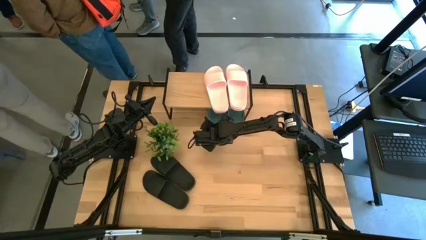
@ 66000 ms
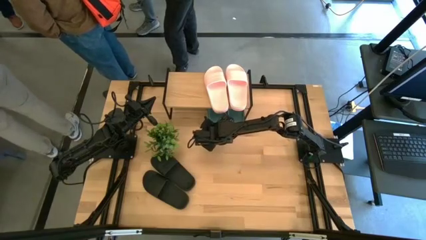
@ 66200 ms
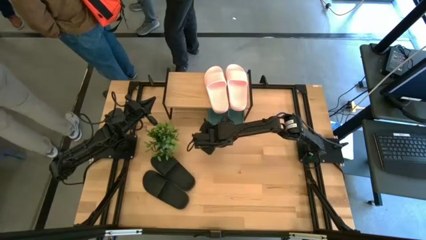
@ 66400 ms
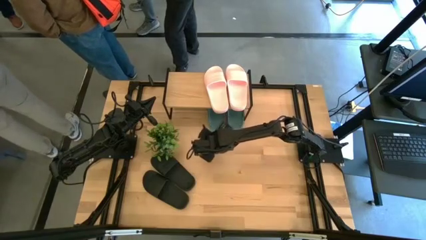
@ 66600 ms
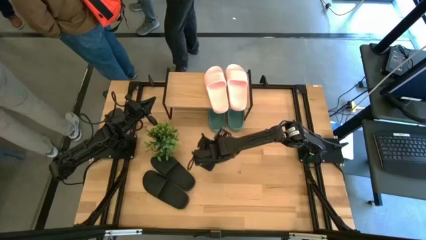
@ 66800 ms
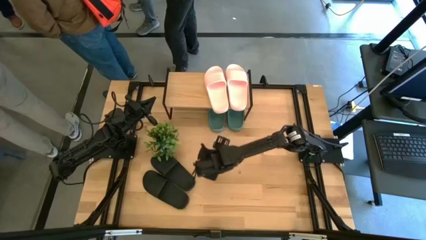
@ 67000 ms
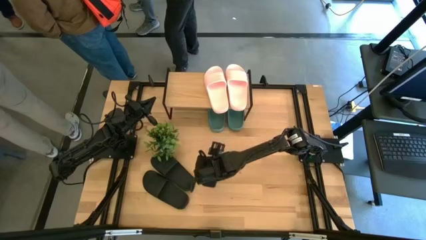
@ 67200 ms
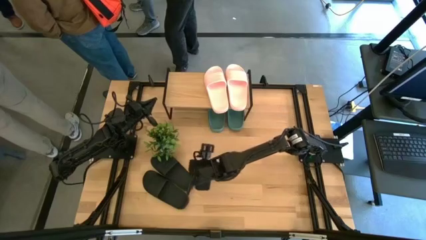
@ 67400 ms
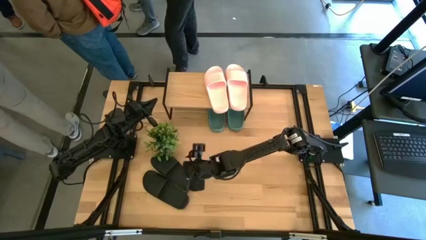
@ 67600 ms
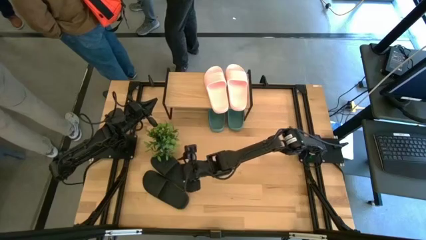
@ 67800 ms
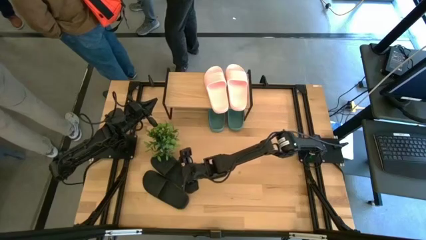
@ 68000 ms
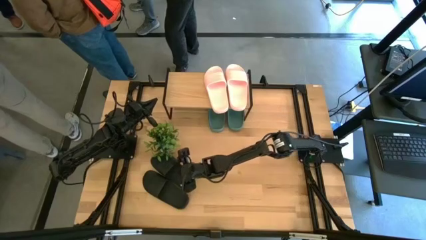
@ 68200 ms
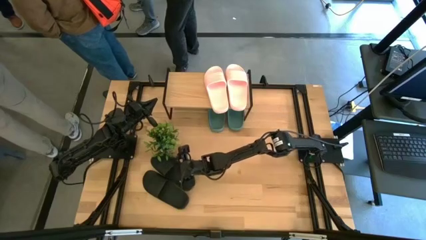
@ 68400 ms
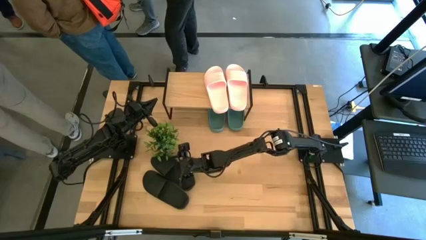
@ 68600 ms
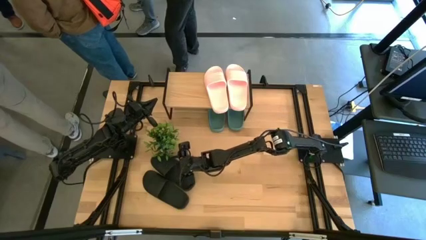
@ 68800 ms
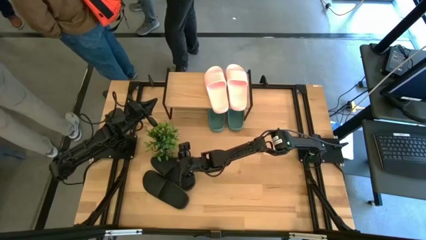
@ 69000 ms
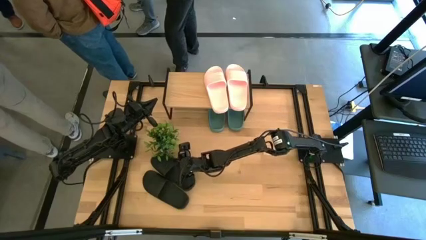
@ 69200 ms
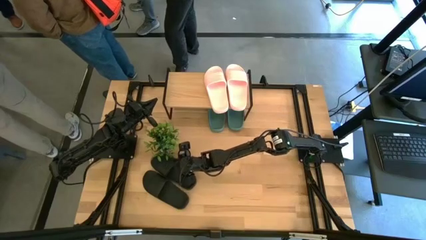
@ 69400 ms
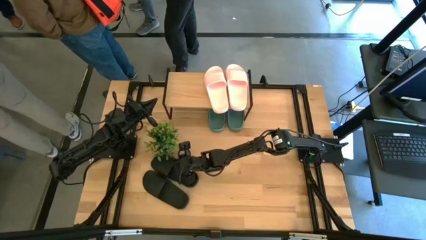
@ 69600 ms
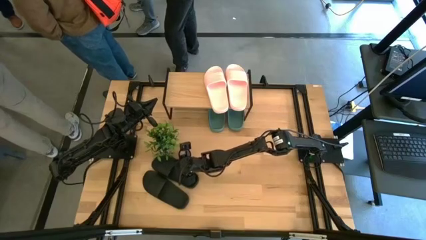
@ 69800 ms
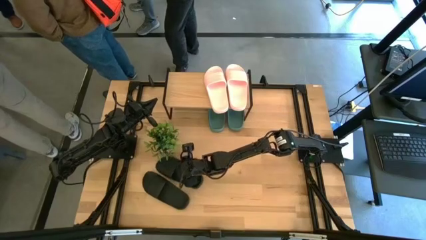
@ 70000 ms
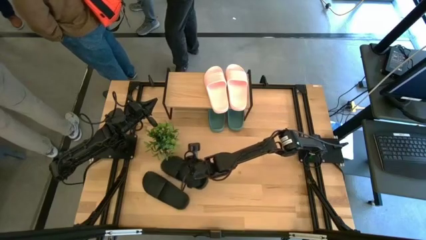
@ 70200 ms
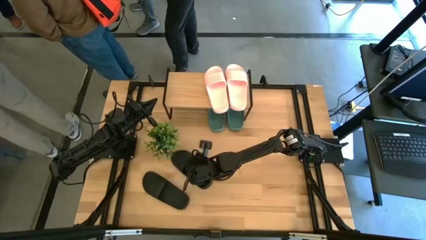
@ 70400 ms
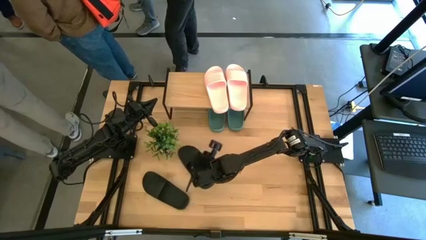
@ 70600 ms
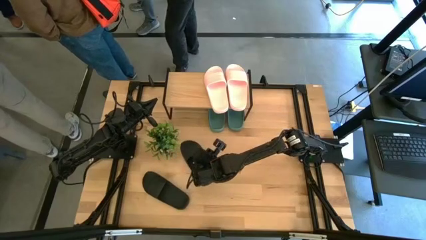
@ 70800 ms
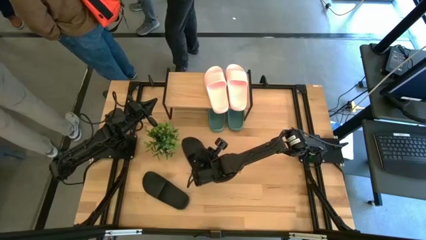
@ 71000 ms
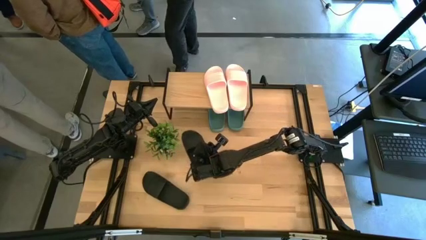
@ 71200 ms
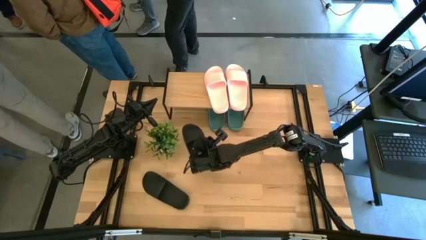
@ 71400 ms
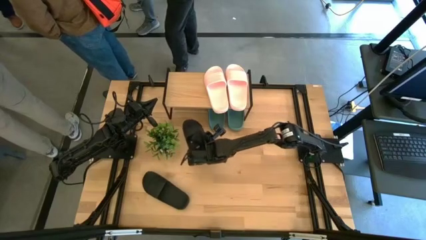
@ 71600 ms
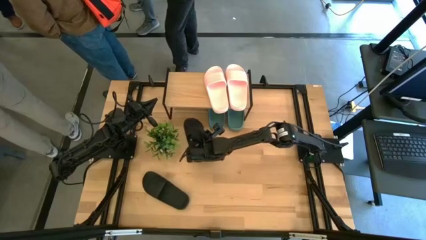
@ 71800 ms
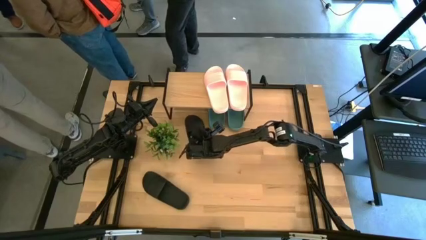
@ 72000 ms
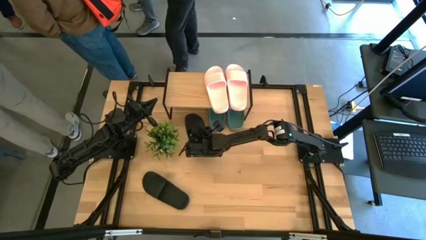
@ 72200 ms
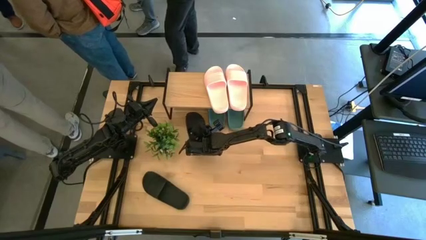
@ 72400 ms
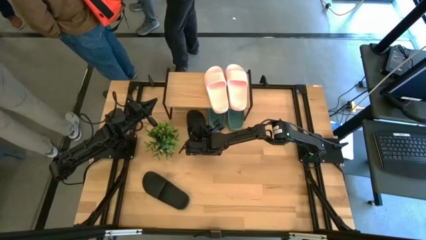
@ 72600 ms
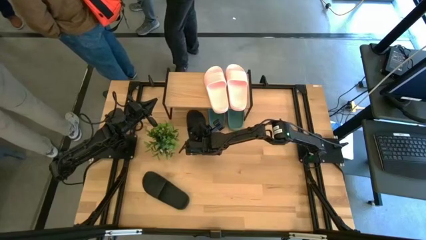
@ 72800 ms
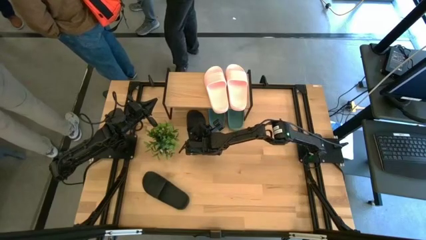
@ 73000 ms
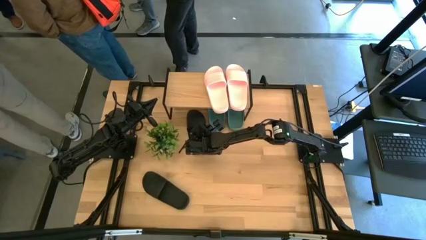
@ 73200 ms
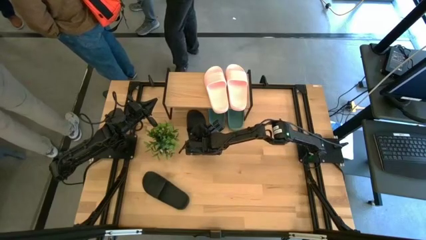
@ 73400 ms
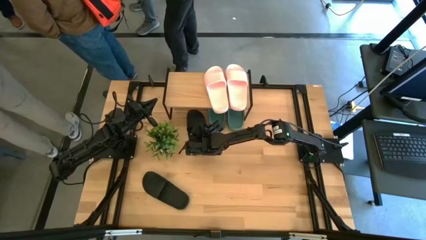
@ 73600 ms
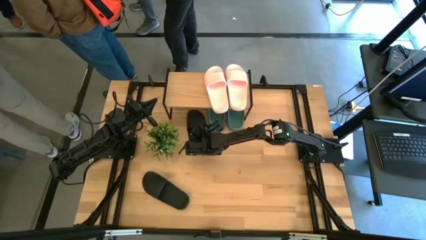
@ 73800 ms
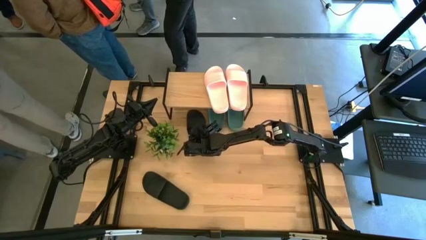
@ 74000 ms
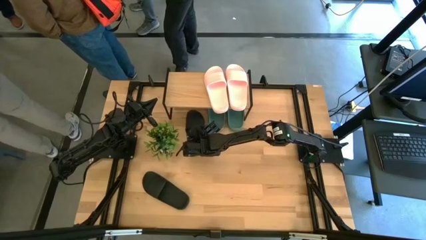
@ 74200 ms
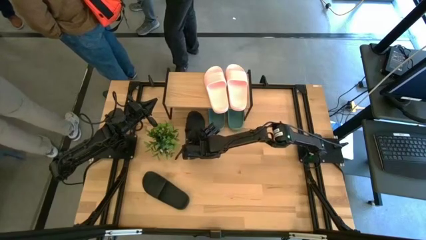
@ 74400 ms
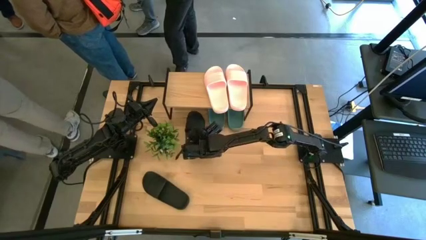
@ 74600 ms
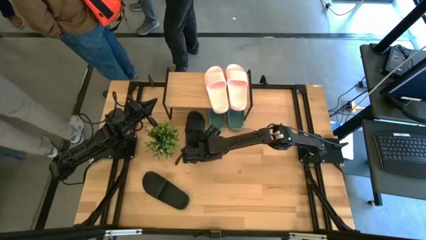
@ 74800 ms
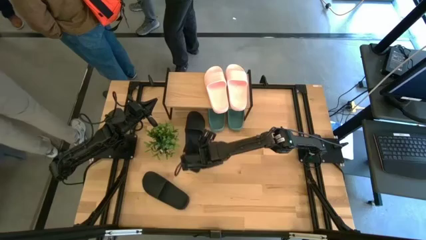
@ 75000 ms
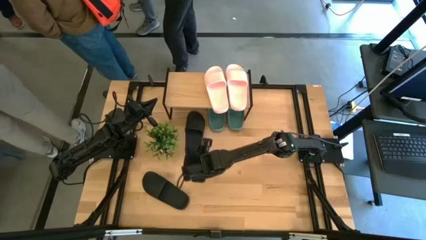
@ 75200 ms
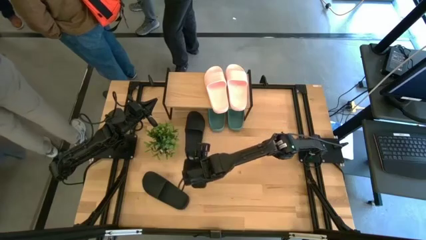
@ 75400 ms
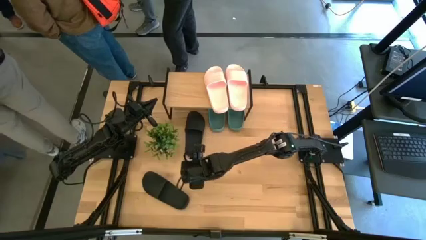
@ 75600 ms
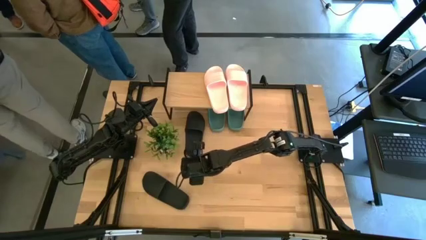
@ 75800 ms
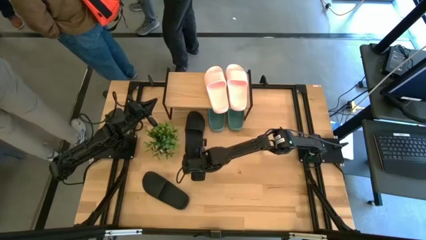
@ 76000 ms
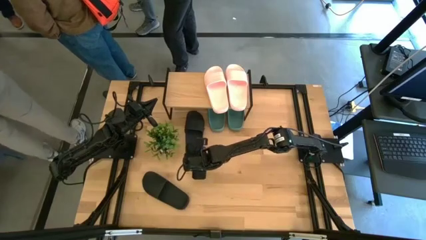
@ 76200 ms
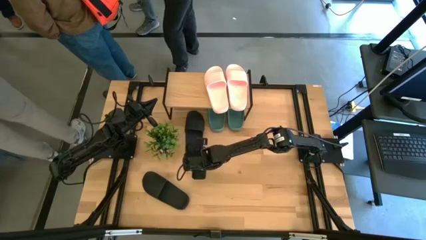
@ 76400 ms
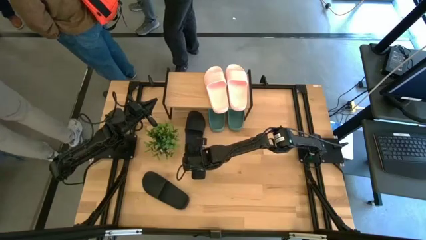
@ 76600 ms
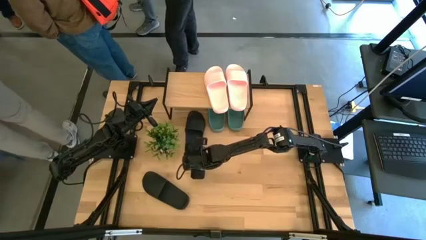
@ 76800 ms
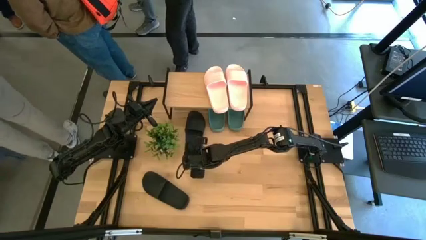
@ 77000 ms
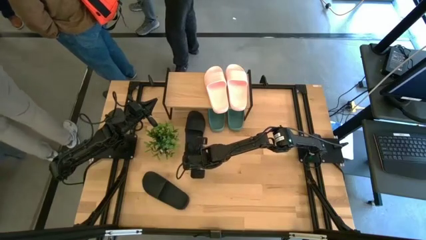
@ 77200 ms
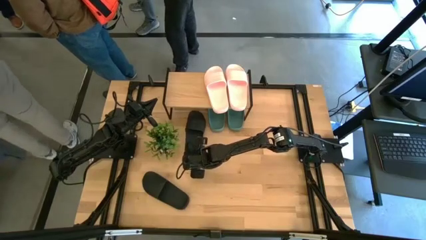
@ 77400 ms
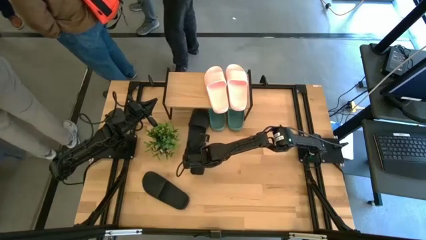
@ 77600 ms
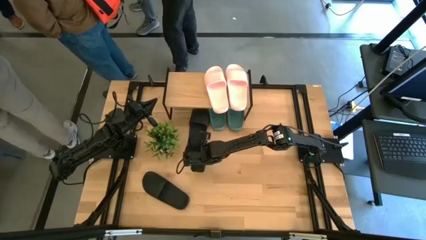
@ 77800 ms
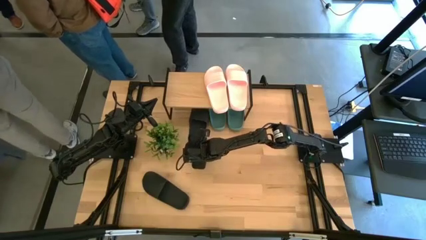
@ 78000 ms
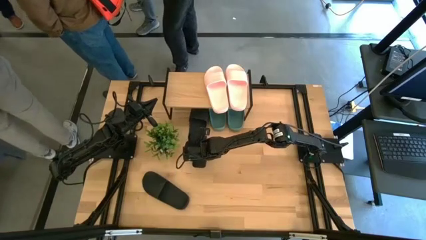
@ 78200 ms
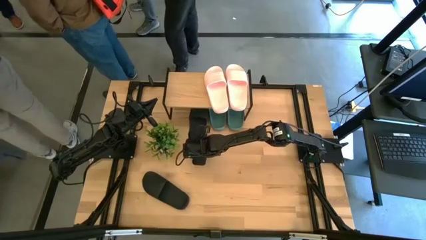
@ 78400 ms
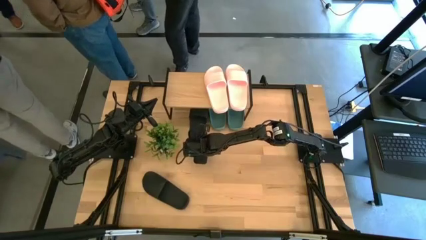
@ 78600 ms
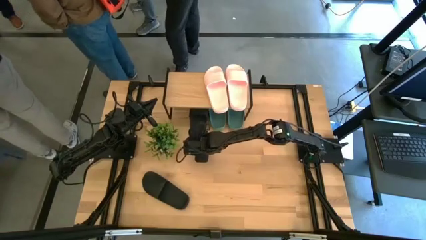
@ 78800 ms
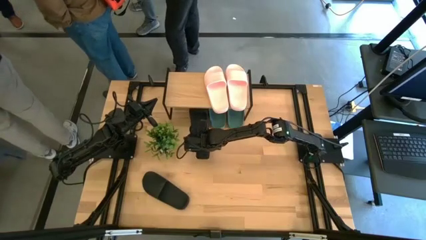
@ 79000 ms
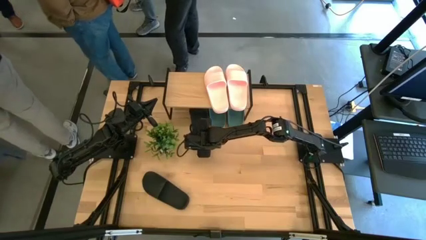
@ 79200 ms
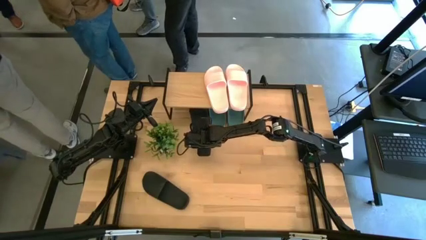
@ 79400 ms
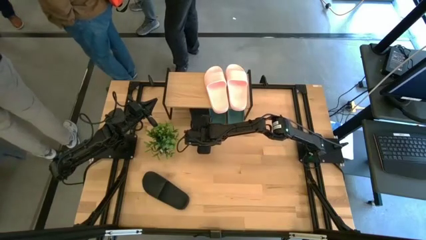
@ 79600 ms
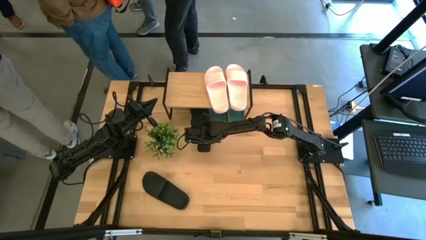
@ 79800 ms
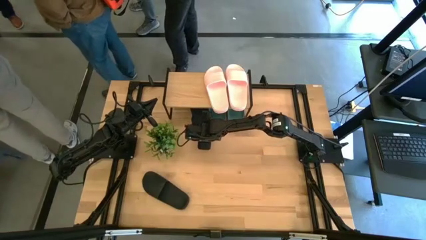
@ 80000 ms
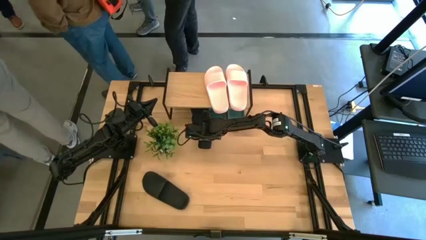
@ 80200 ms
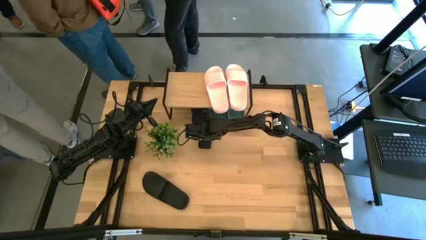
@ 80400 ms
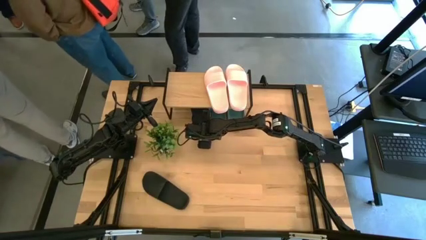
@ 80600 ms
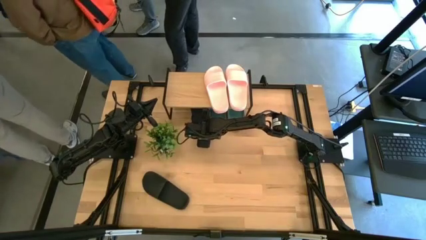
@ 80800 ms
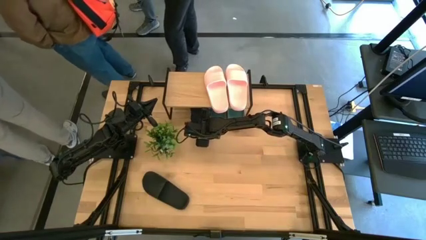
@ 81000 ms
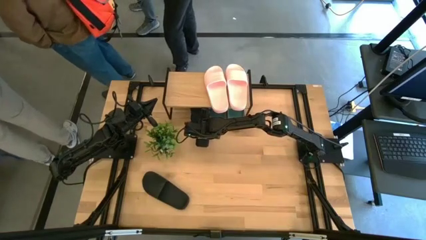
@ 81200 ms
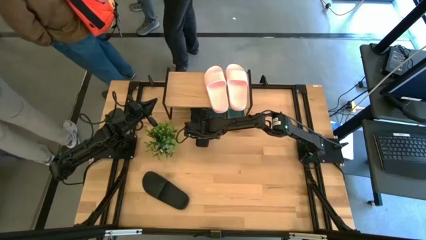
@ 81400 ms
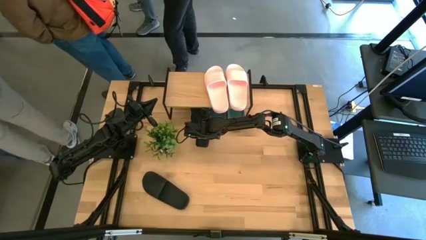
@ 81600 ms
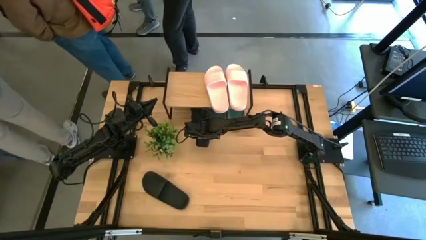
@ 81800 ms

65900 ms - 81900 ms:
Task: Pick and place slides into the shelf
Put the top black slide under the shelf
